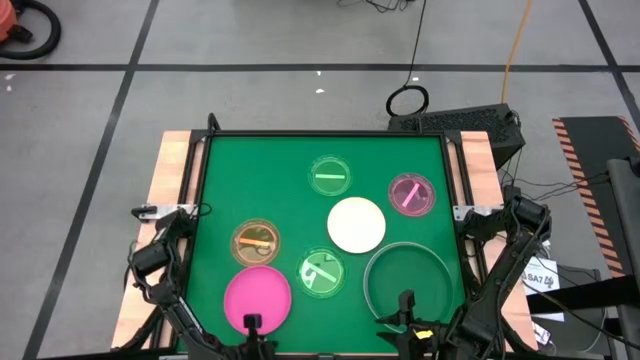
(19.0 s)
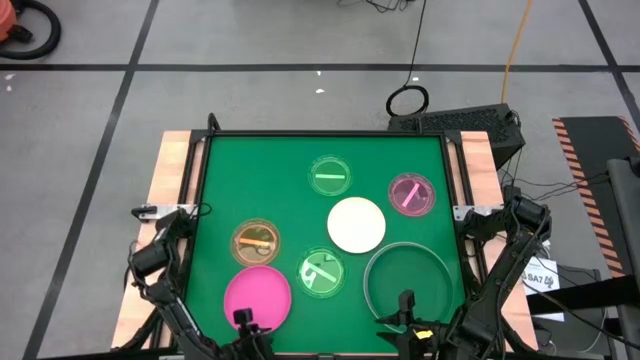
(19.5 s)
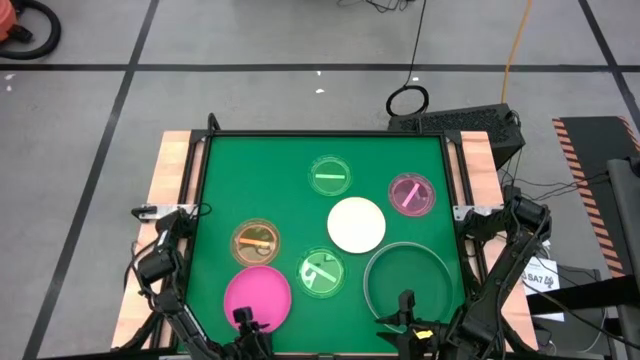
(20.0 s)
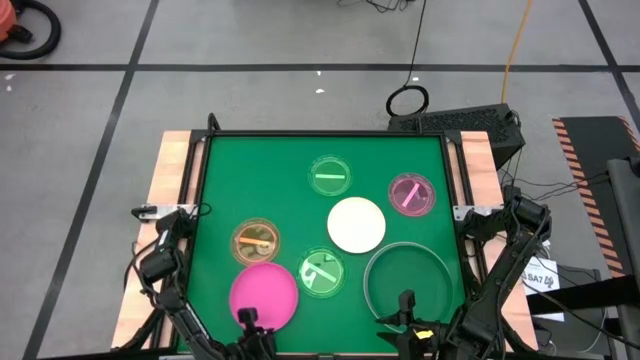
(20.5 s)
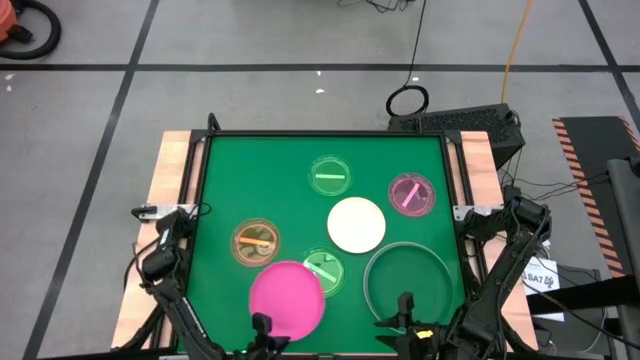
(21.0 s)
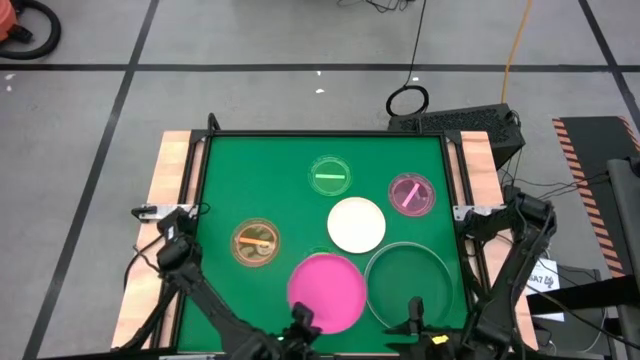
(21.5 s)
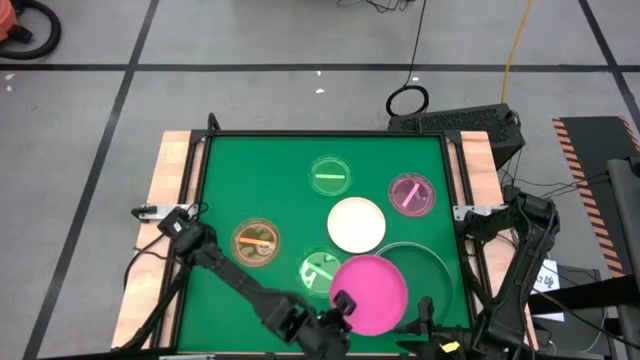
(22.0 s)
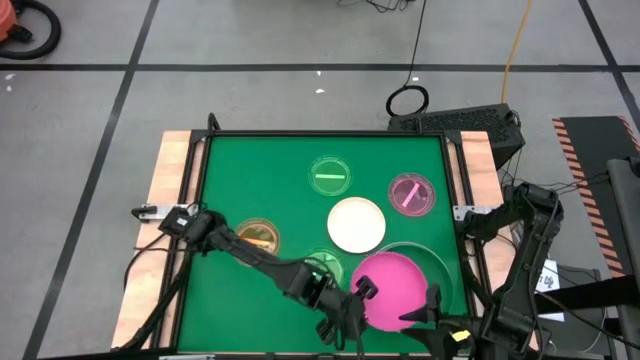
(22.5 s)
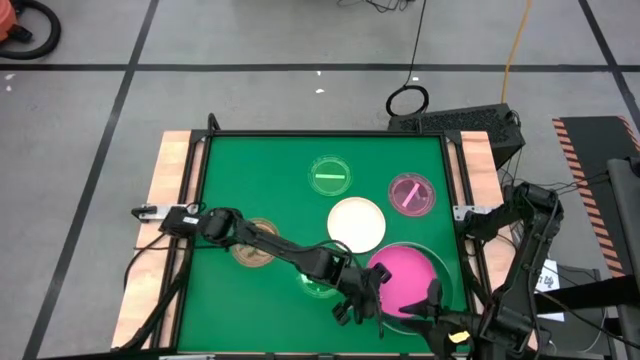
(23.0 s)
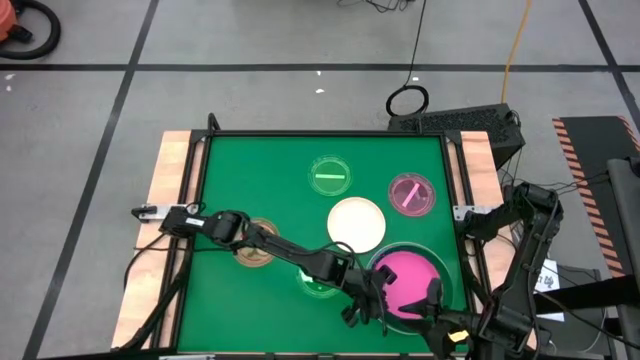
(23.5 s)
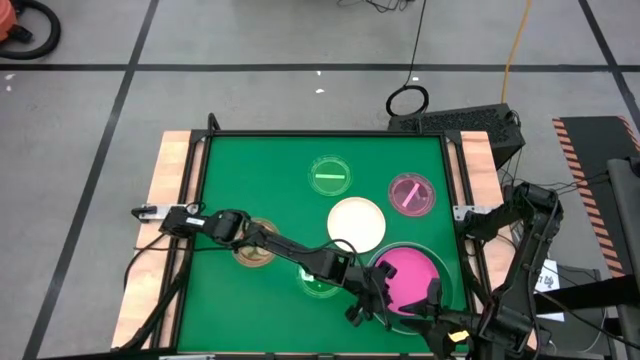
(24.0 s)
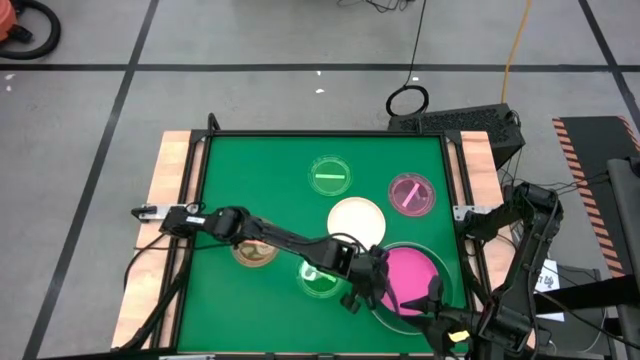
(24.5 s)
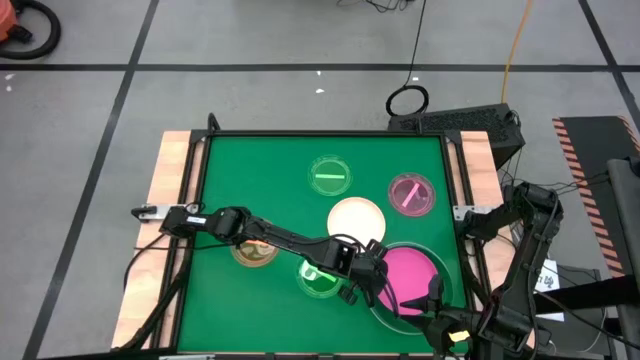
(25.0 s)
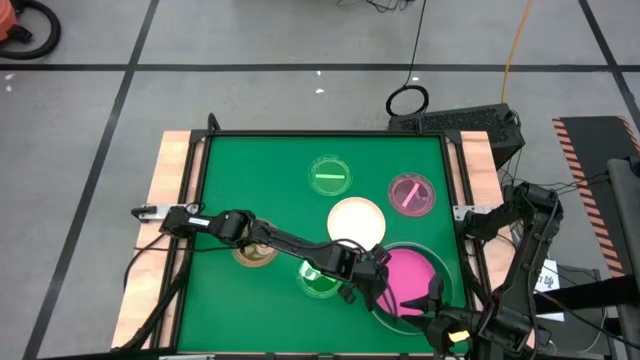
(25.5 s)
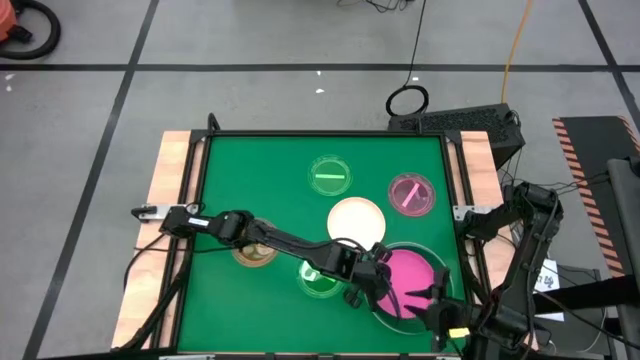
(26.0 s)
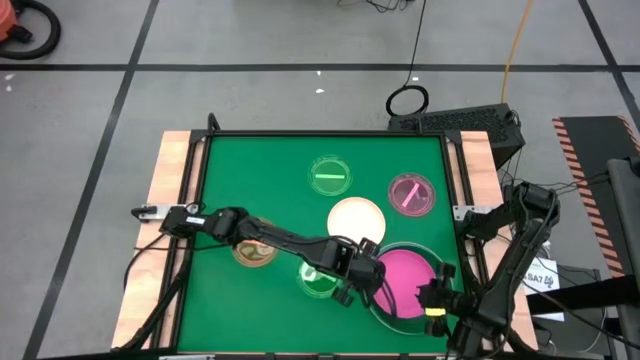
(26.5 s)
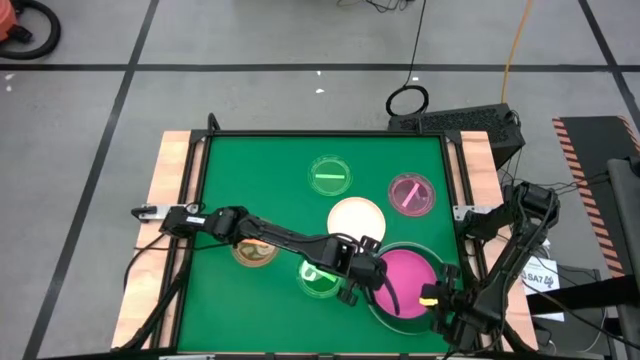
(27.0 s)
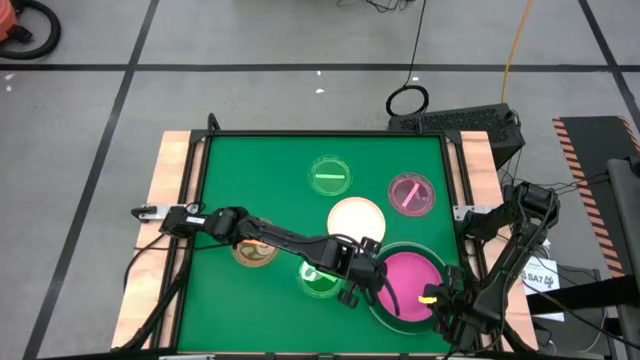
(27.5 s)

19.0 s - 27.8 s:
Task: Stack plastic plates
Stack the dark pink plate on top of the dark green plate

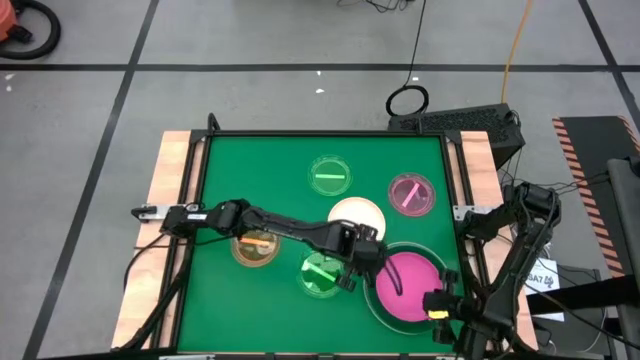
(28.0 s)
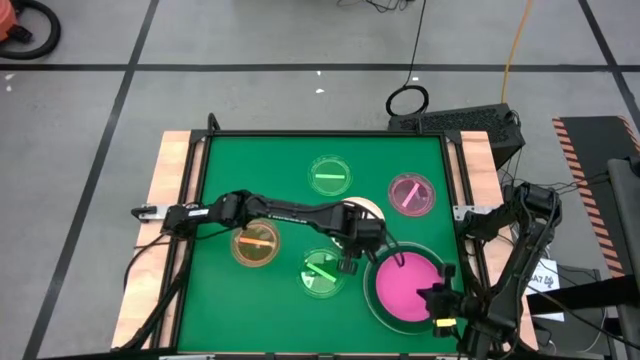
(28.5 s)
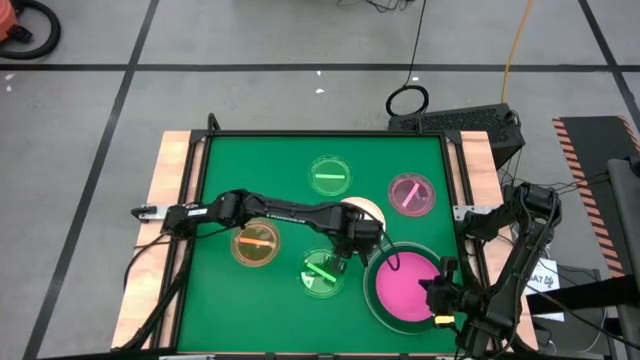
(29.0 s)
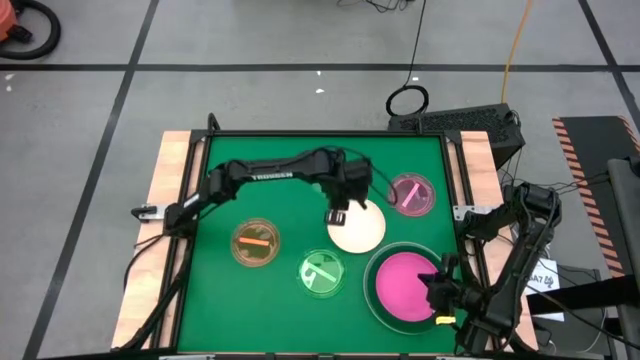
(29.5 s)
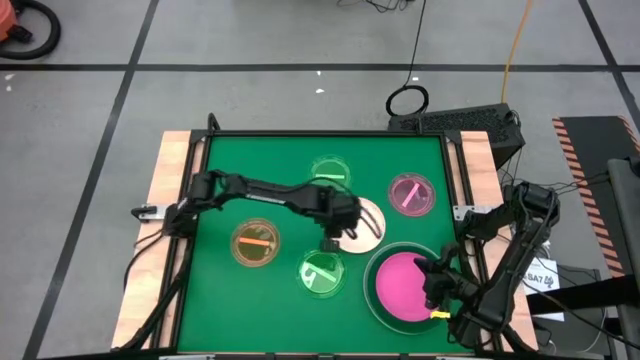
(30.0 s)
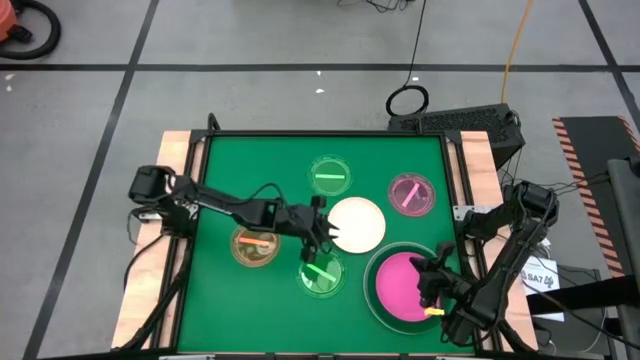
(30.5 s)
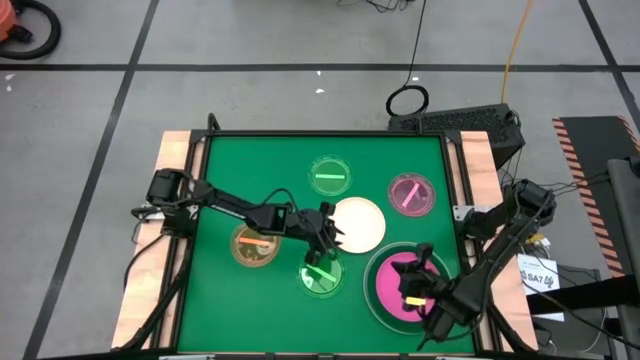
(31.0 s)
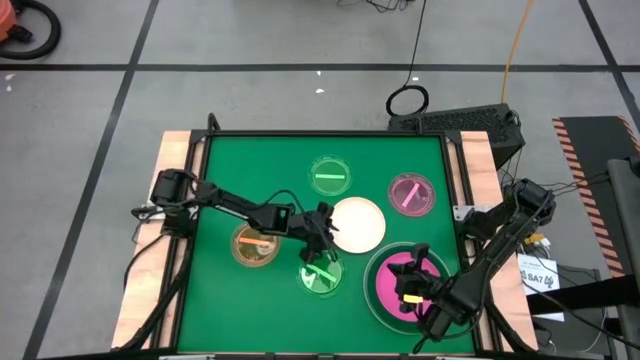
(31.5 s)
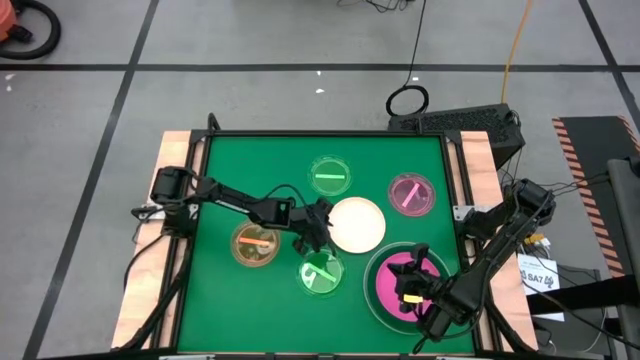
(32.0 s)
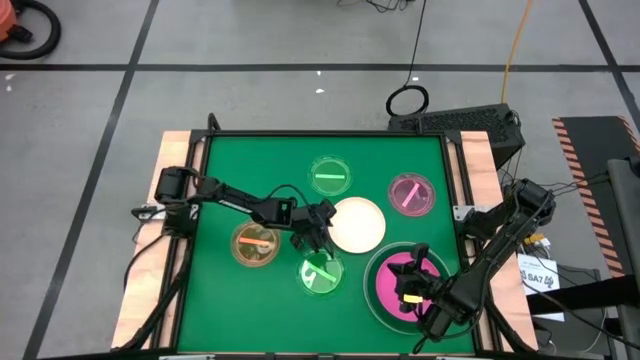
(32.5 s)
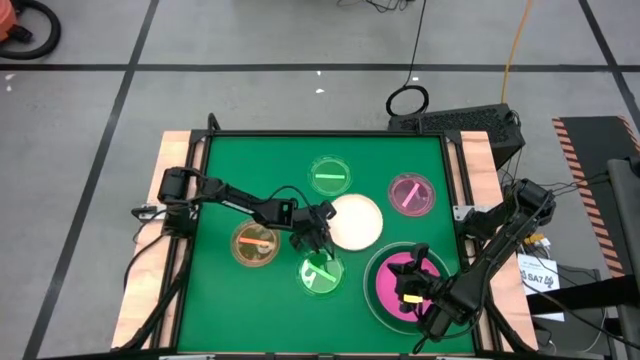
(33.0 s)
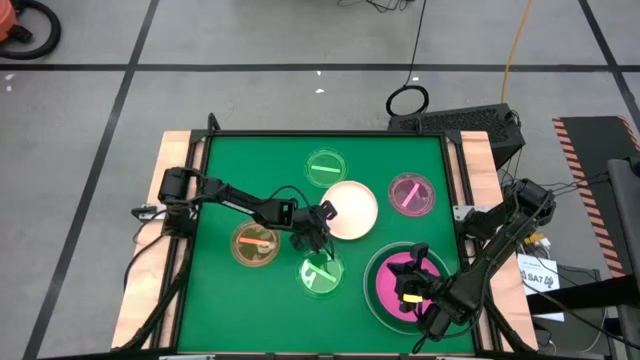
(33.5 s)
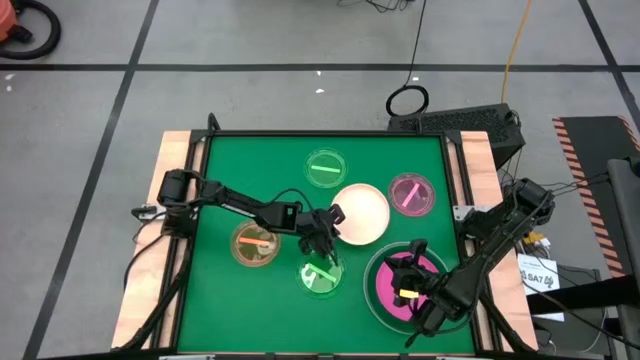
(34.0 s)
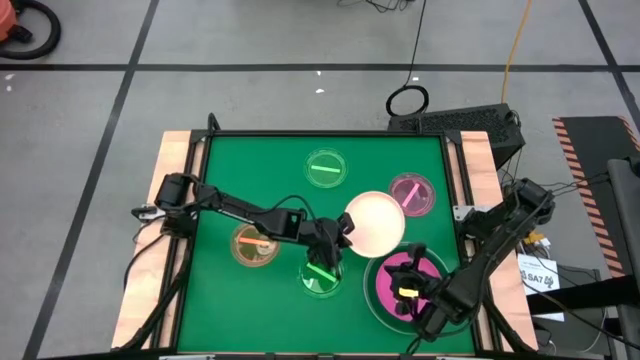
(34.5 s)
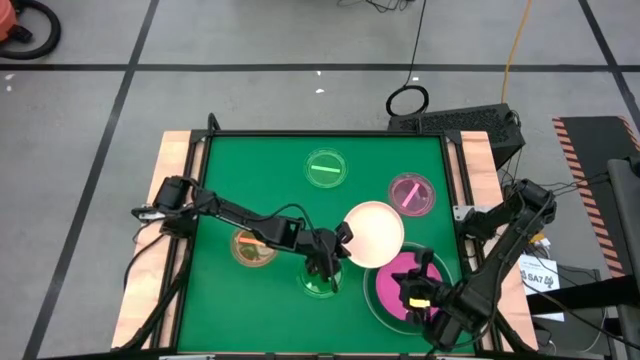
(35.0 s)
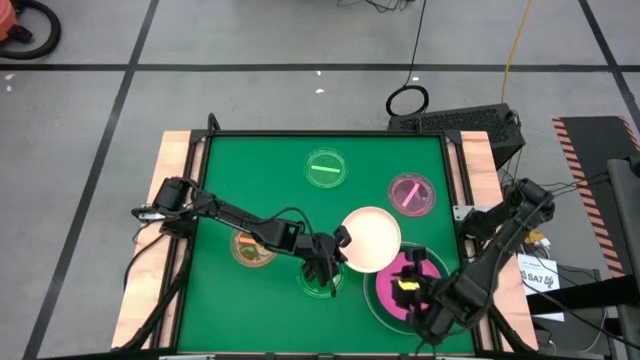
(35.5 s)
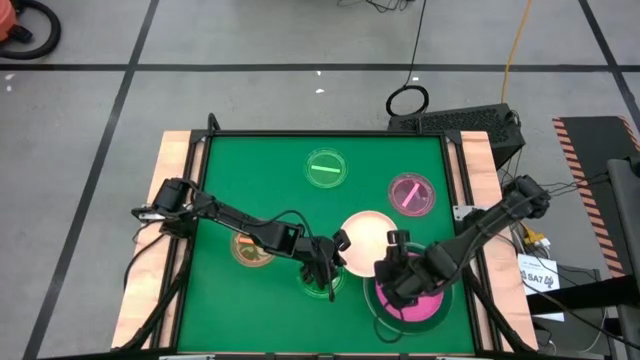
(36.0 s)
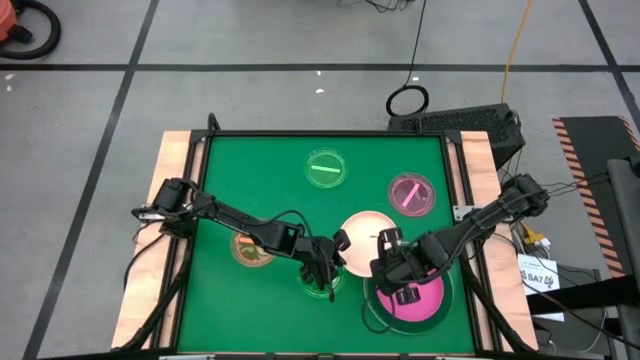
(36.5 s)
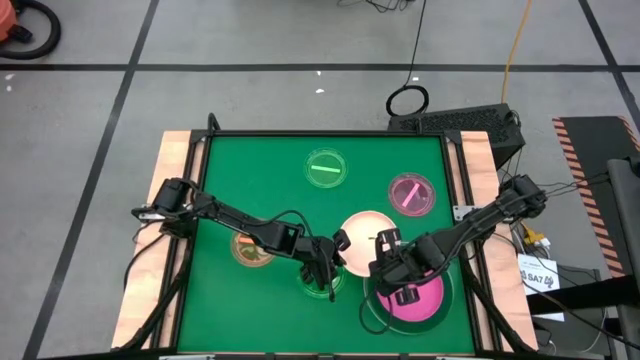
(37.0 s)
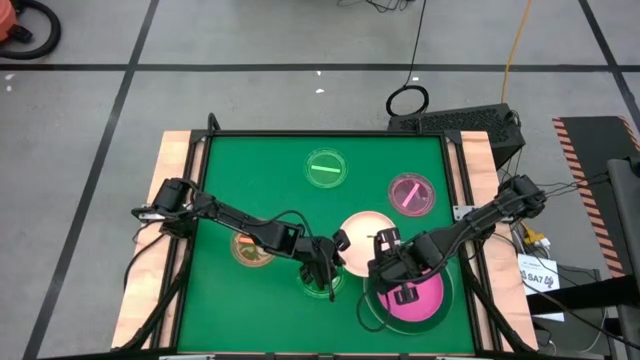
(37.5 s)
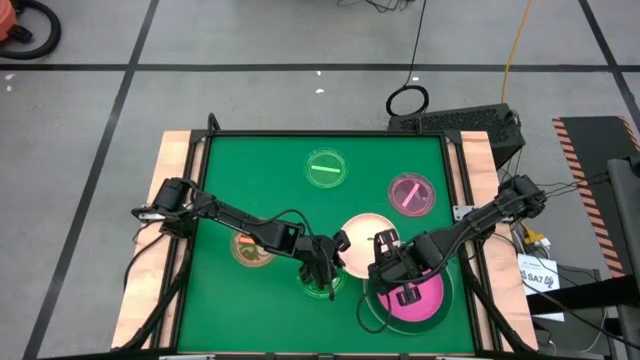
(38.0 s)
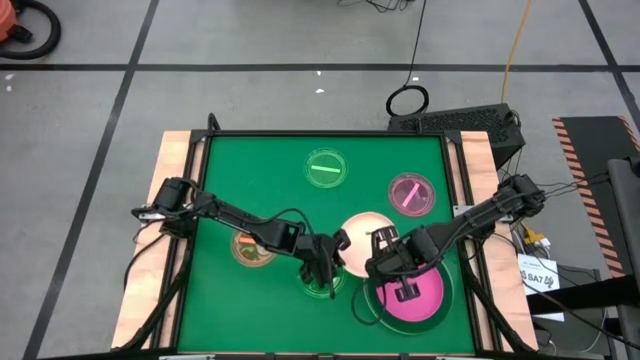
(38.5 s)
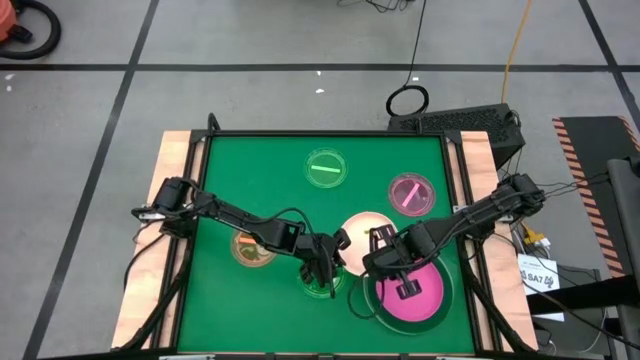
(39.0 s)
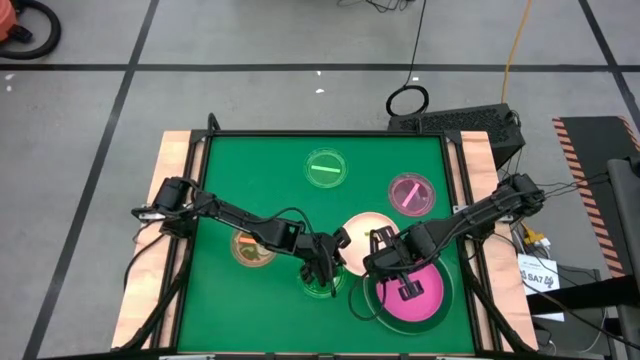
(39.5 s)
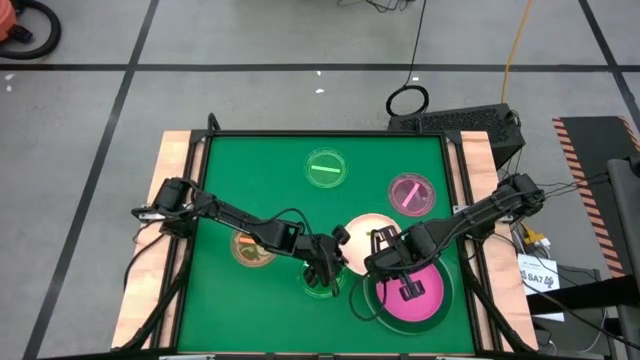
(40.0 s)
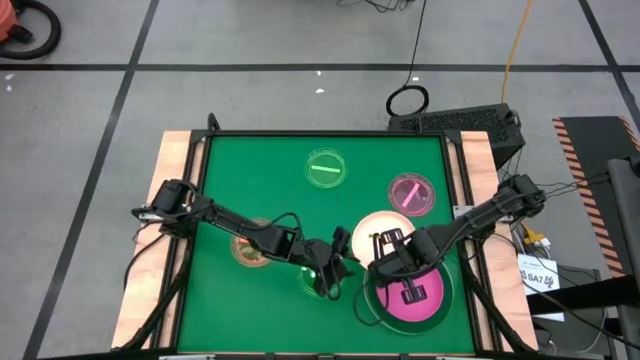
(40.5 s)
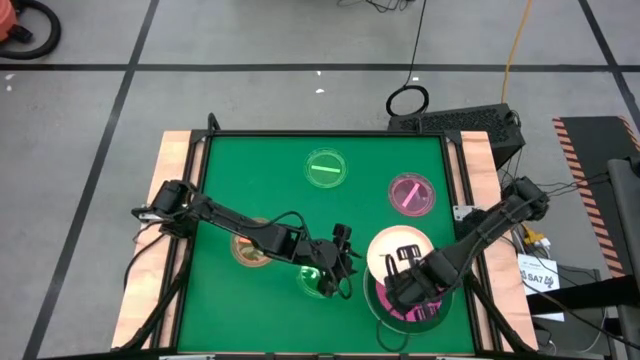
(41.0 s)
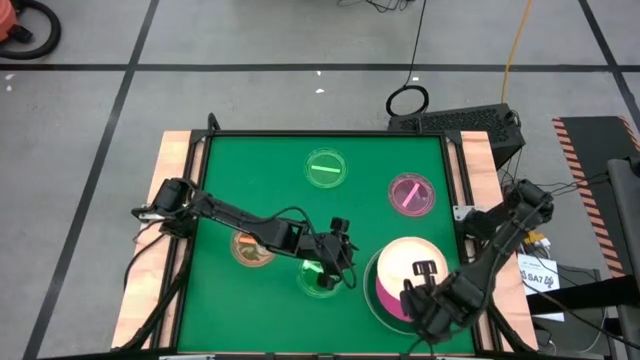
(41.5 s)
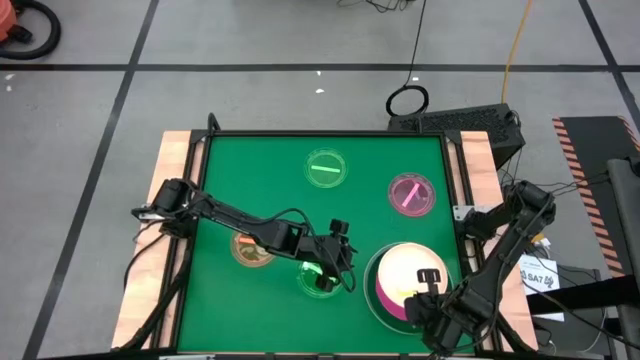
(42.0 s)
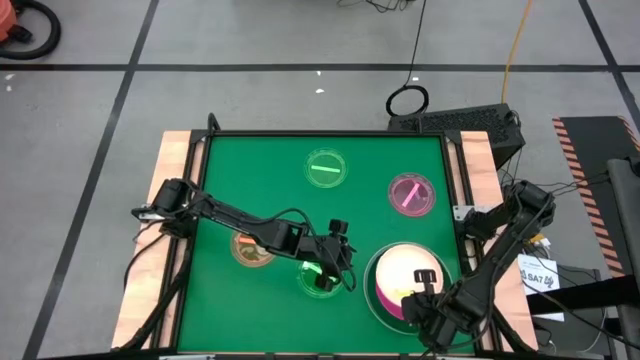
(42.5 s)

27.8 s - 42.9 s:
Stack the white plate on top of the dark pink plate
